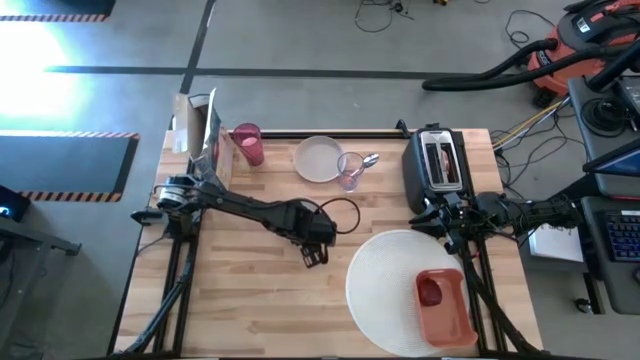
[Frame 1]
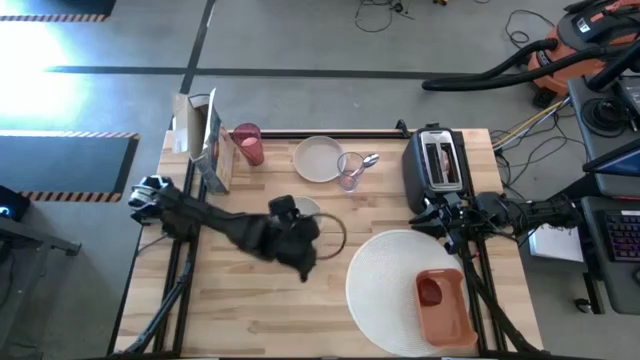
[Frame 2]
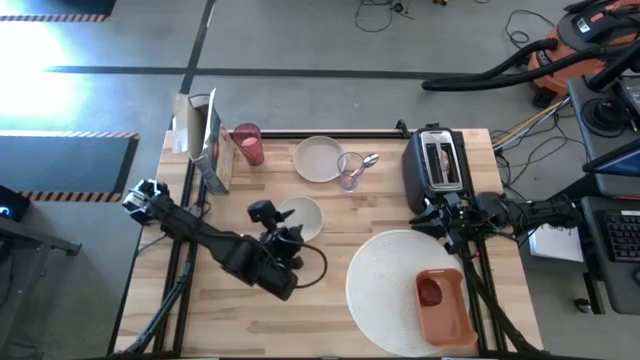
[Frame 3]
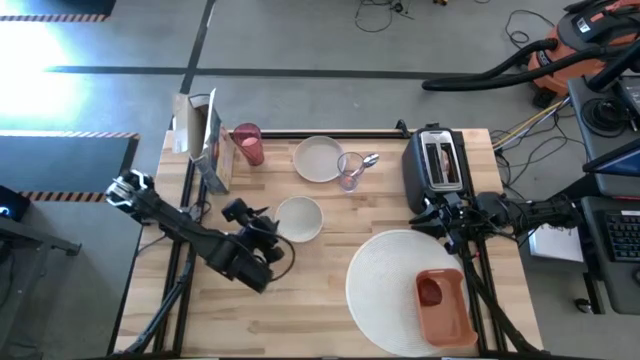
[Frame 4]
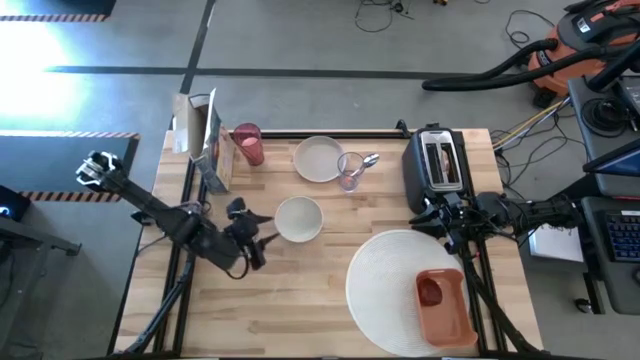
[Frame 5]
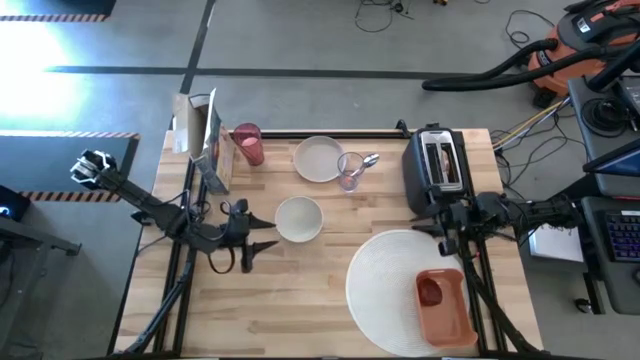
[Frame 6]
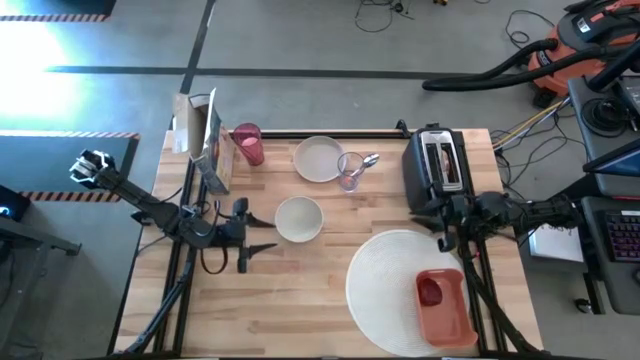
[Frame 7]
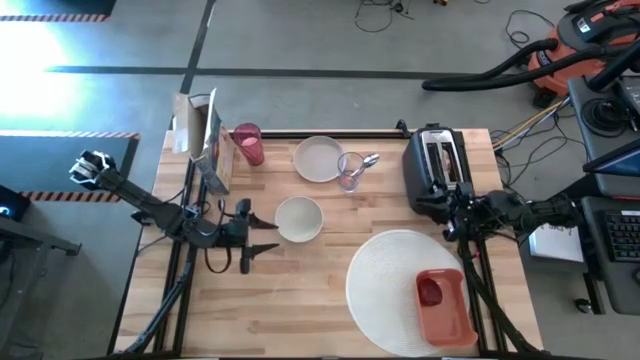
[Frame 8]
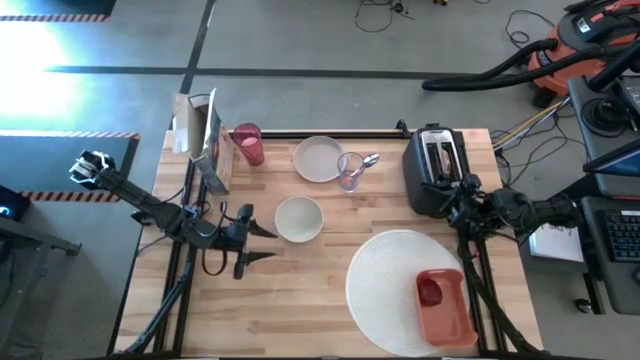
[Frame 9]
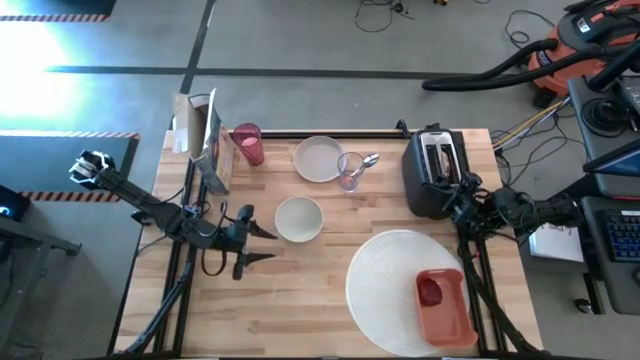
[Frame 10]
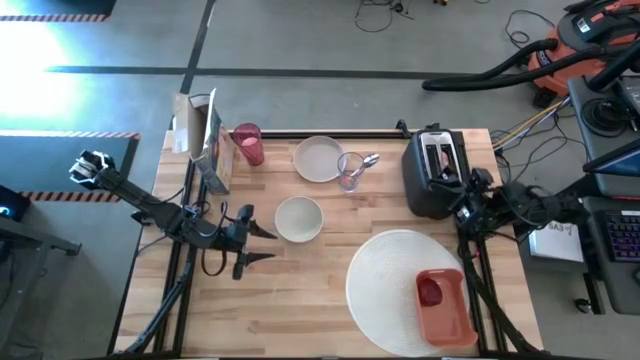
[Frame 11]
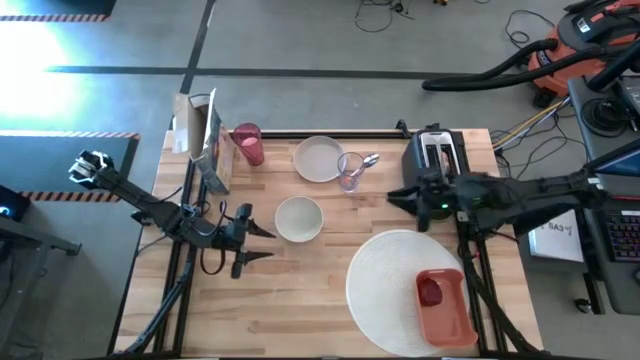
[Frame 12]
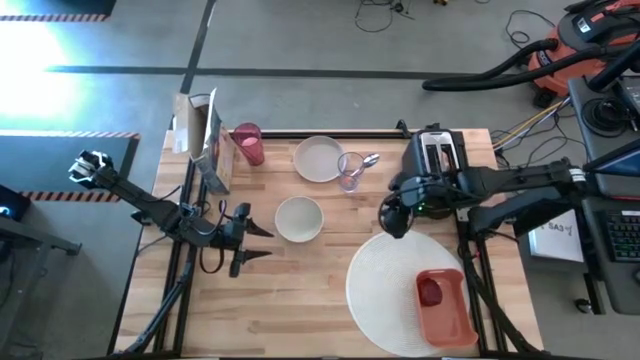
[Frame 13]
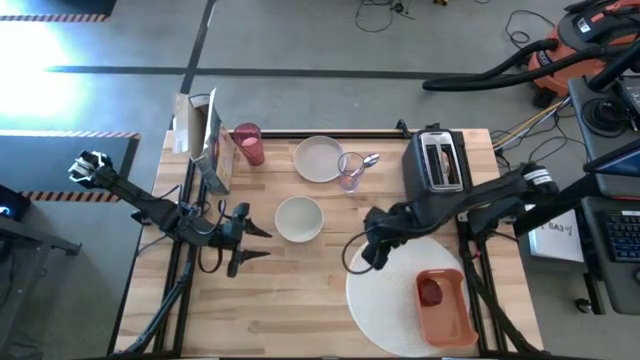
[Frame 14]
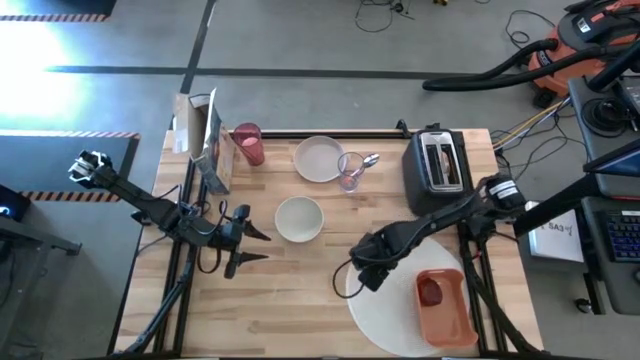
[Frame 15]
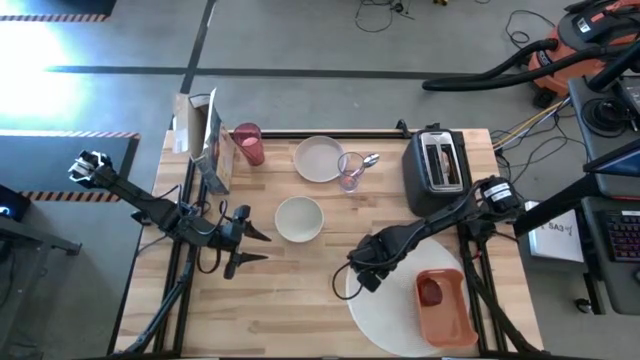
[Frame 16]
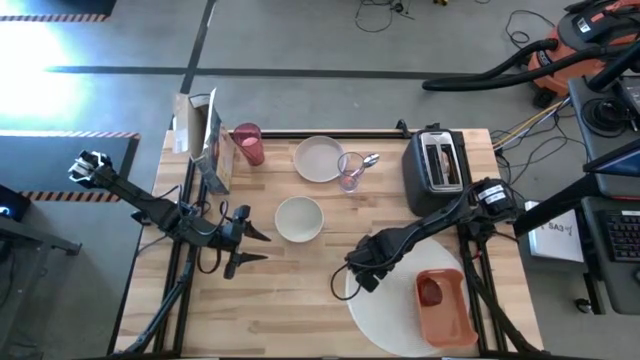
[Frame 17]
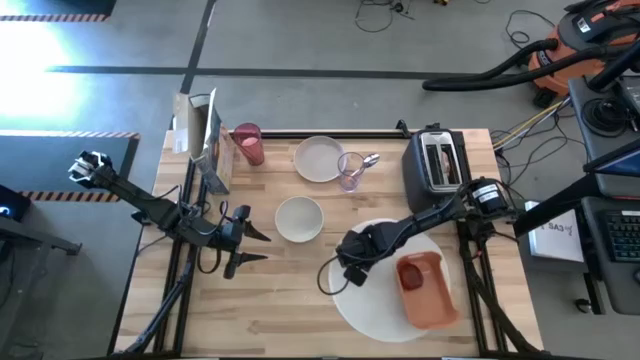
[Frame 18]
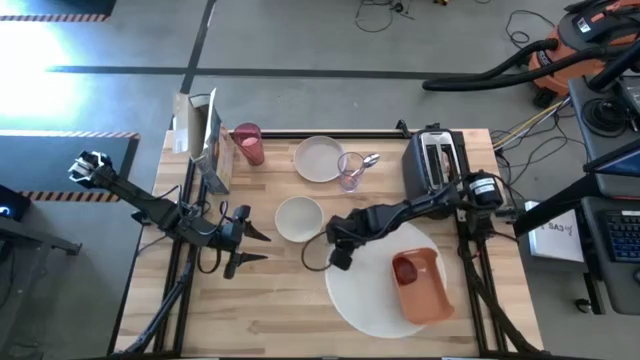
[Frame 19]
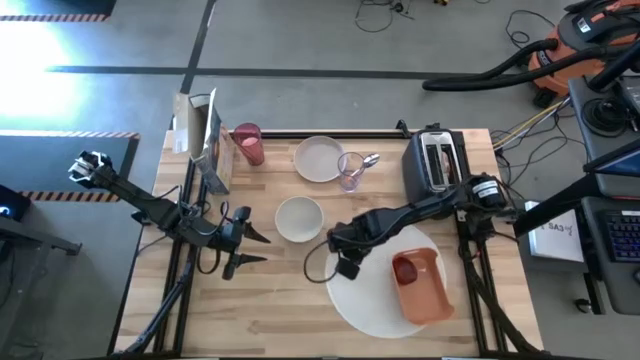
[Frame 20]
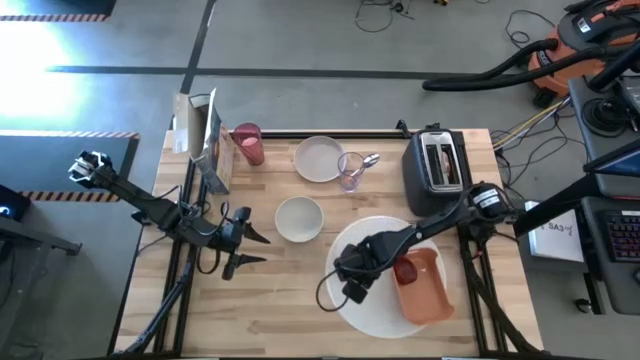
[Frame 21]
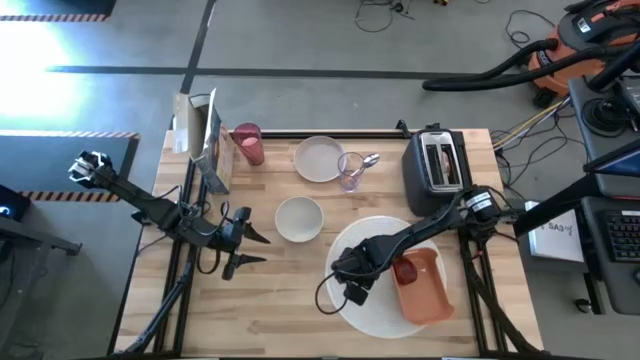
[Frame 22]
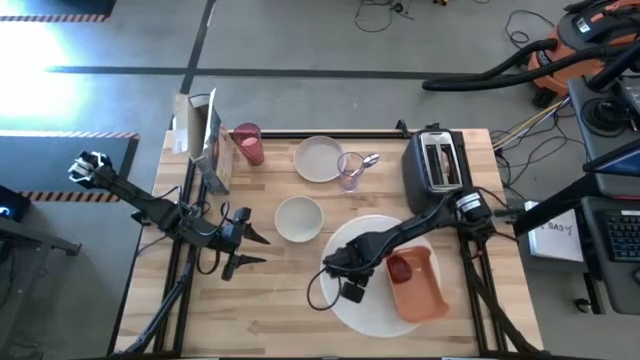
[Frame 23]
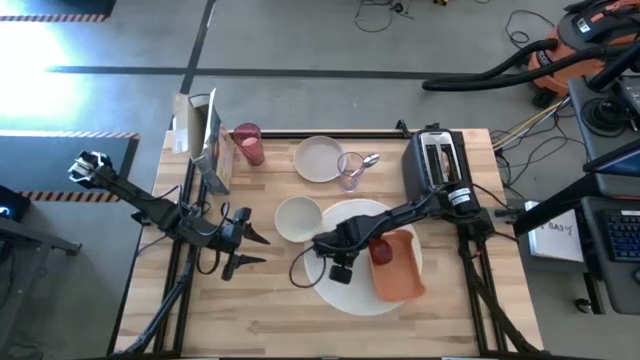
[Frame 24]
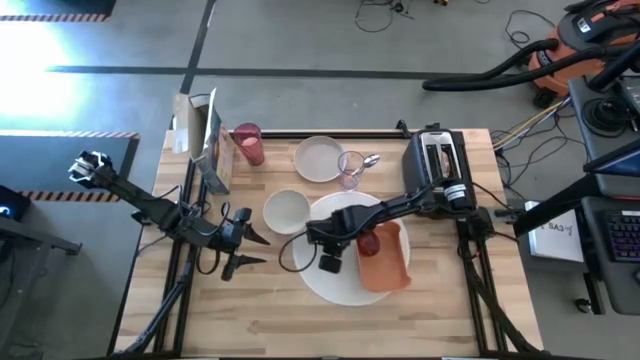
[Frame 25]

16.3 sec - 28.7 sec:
Task: Arrange a breakfast setting
Move the tablemat to the center of the table

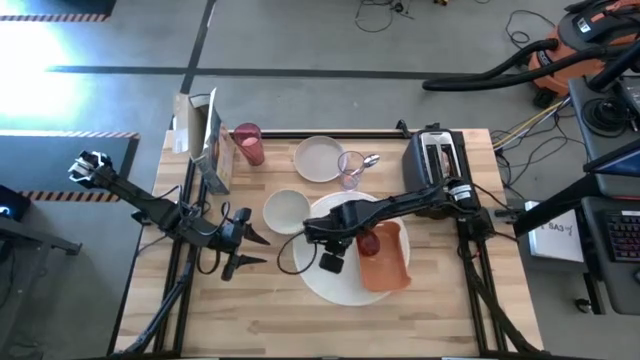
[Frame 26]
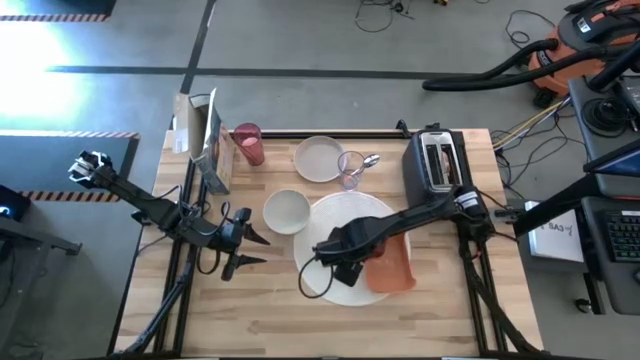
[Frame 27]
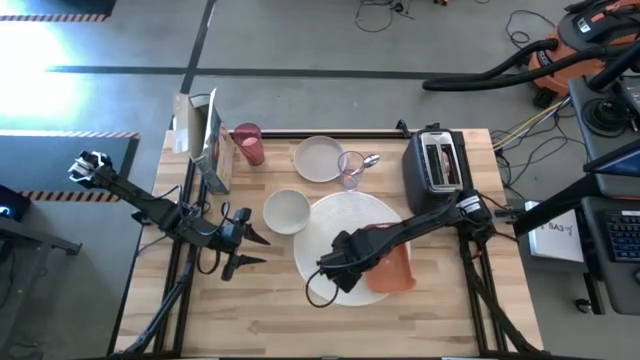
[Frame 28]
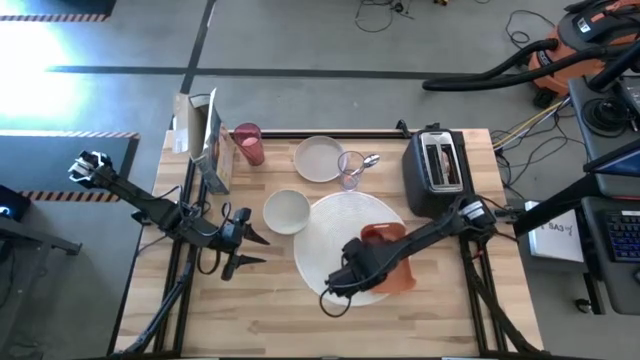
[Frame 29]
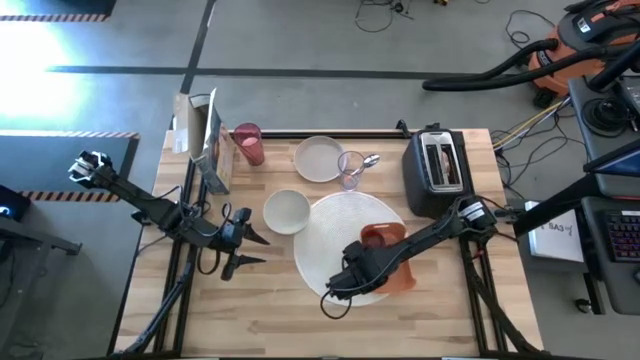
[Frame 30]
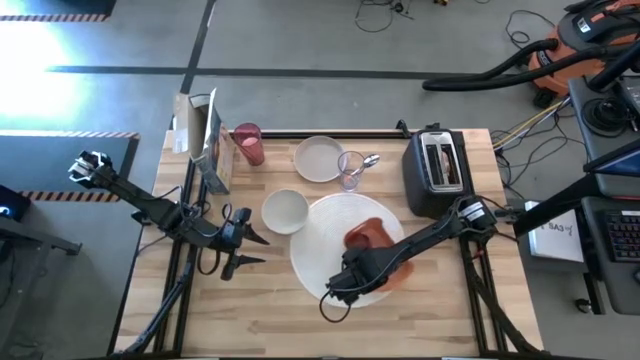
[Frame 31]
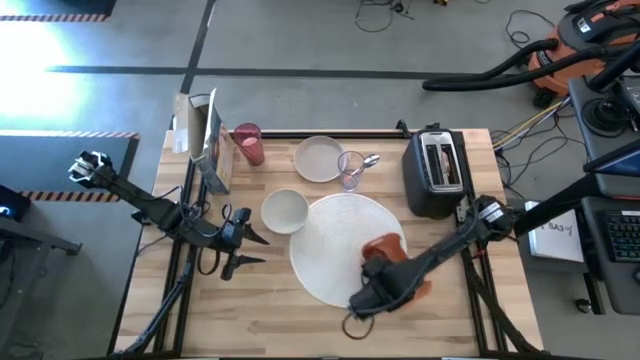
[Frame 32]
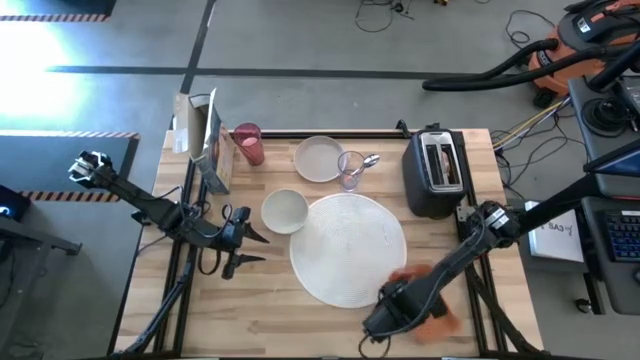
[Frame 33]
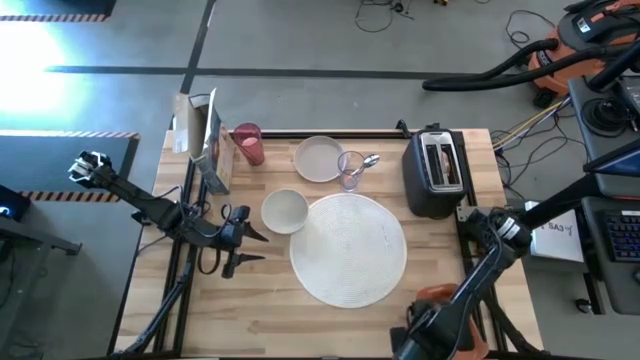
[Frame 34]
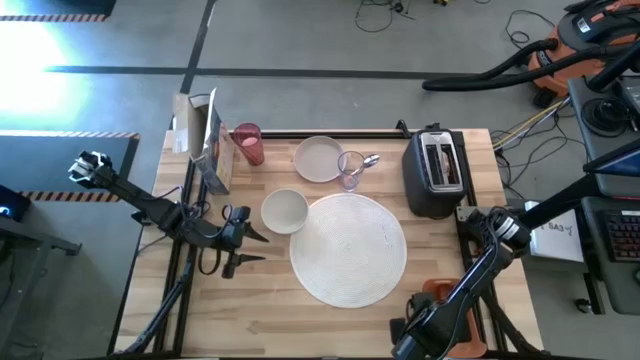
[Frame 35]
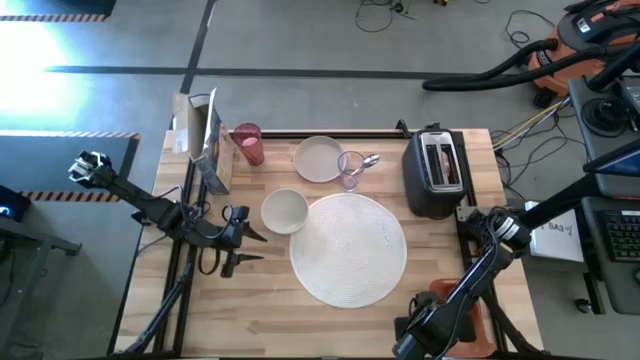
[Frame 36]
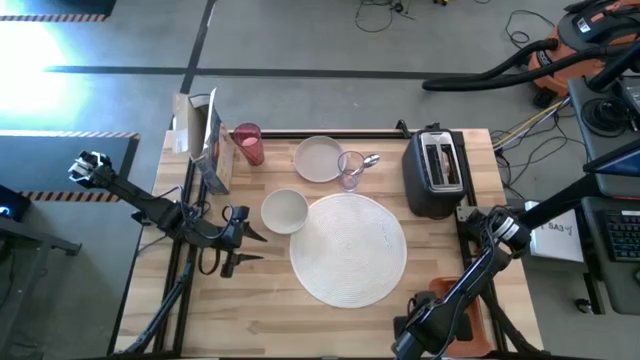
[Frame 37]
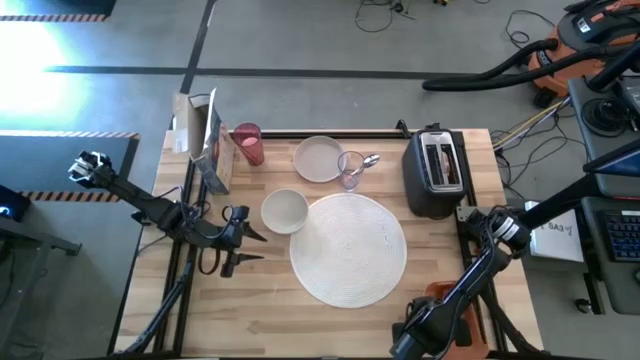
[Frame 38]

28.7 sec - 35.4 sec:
Move the orange bin to the bottom right of the table

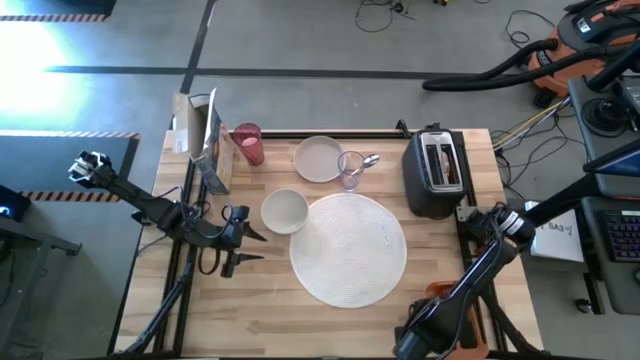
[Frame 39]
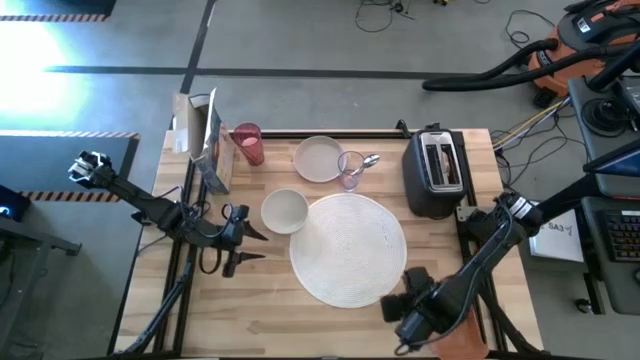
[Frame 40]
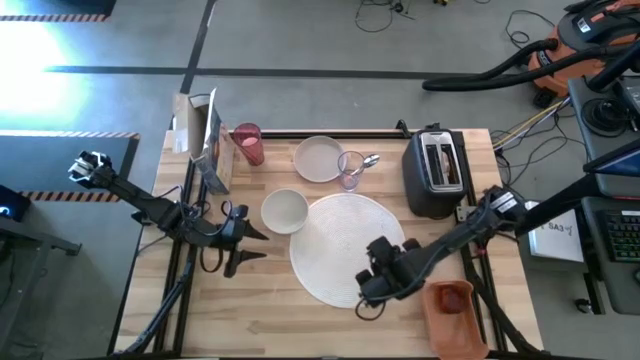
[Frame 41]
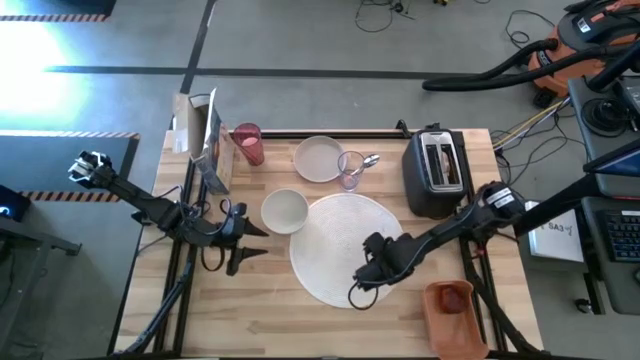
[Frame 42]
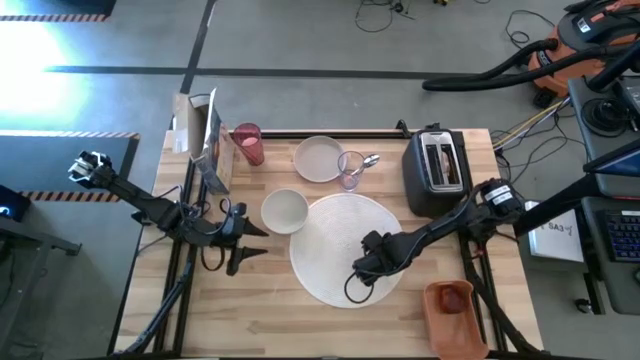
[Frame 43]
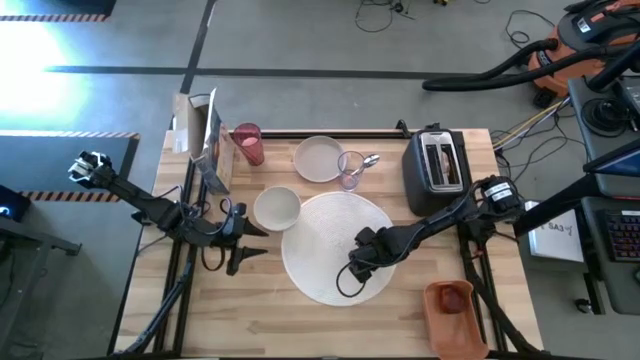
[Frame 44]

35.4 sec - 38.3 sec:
Adjust the white tablemat
